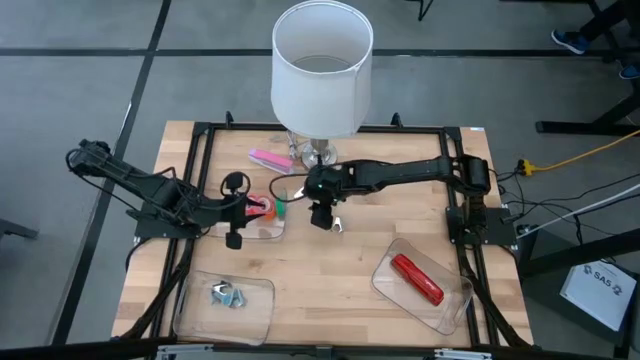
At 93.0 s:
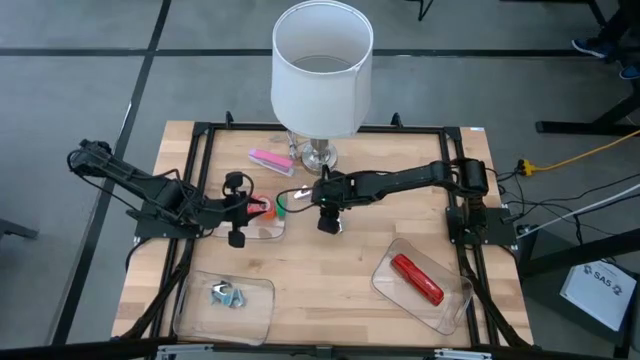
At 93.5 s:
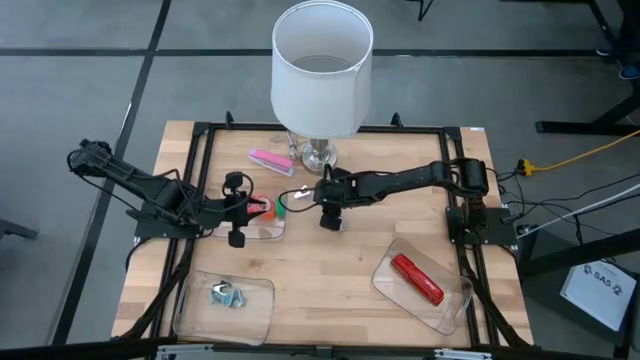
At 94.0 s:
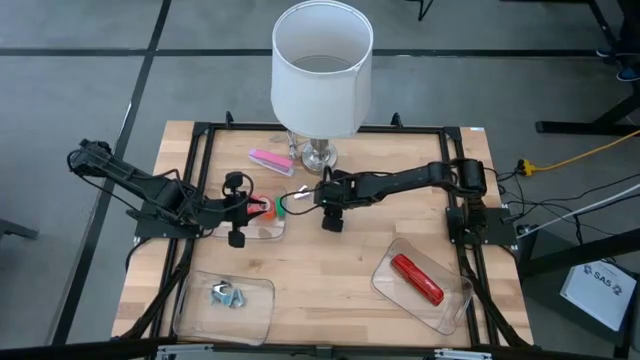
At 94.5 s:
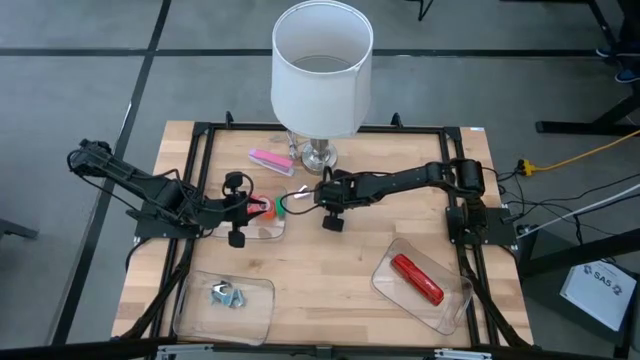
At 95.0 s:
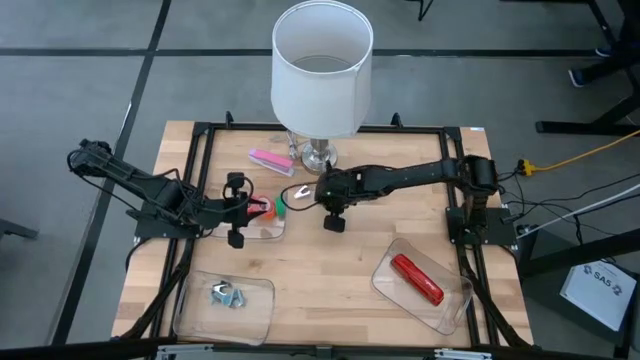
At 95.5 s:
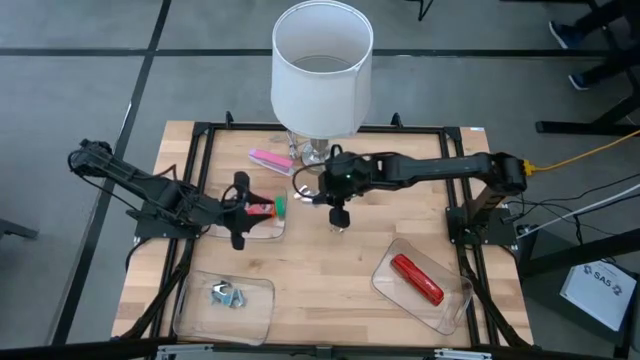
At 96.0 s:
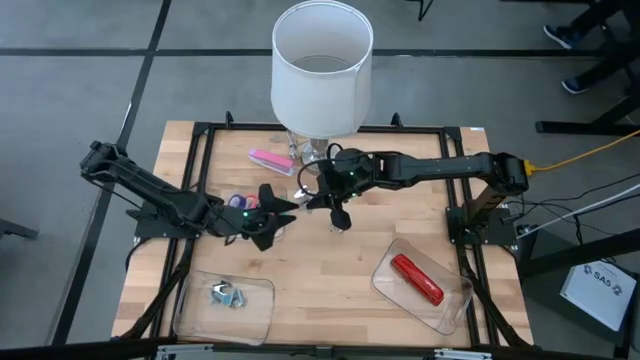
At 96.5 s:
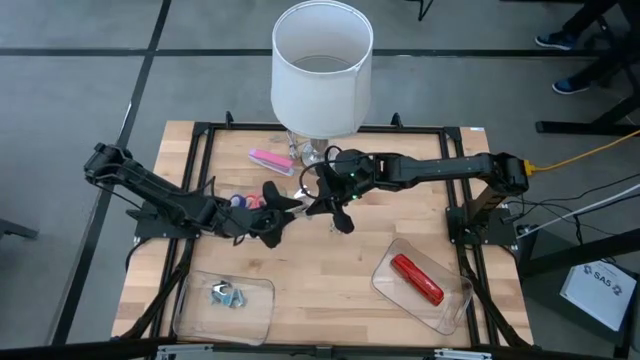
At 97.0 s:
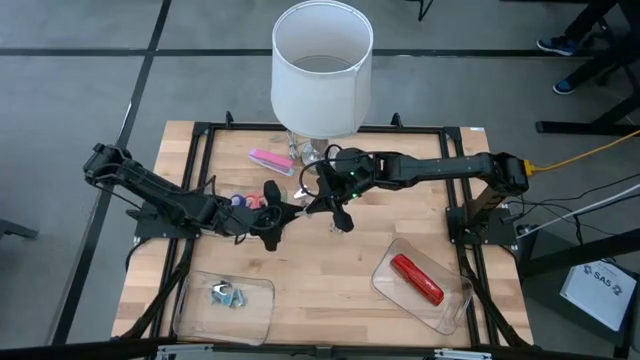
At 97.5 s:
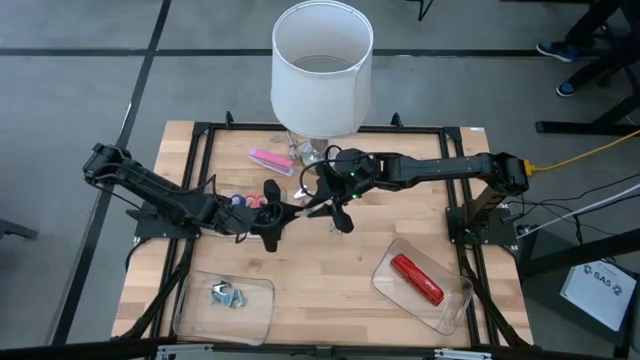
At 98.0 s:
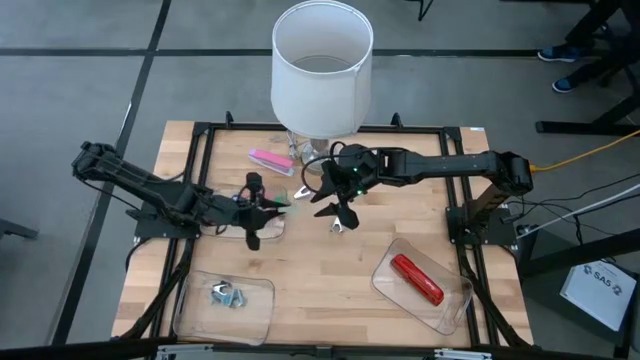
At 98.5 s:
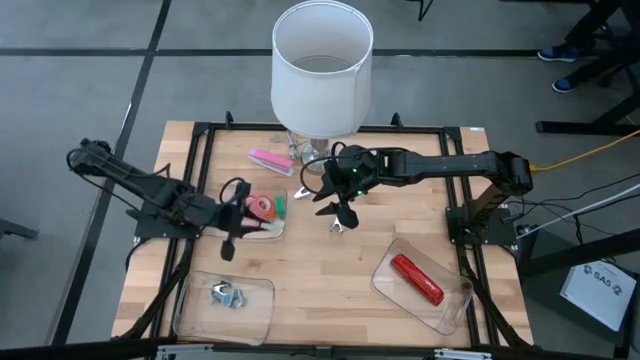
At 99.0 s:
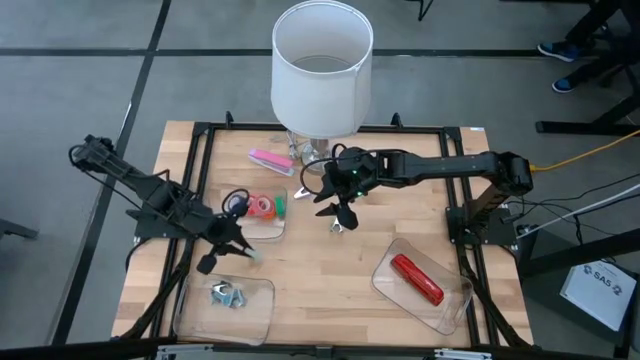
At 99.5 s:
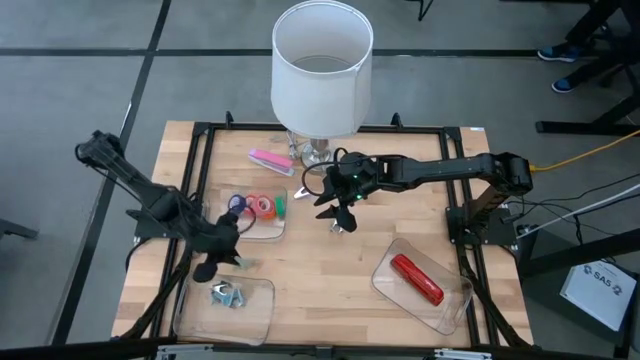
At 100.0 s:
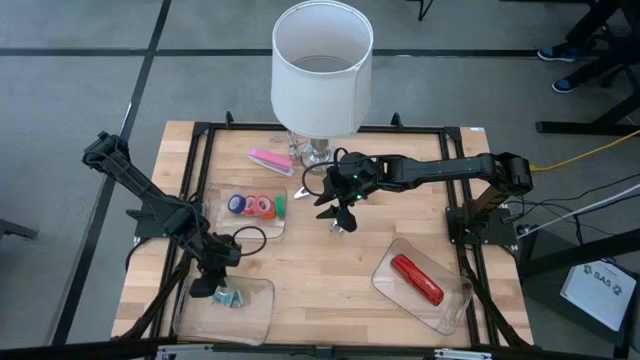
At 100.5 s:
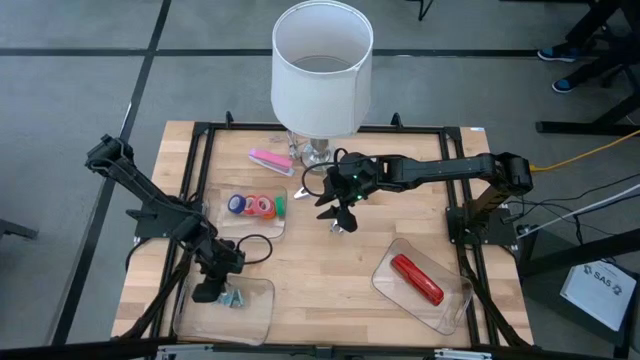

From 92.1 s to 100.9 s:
Task: Pick and place Stapler, Stapler remover, tape
Put the top gray staple remover into the bottom left transparent bin

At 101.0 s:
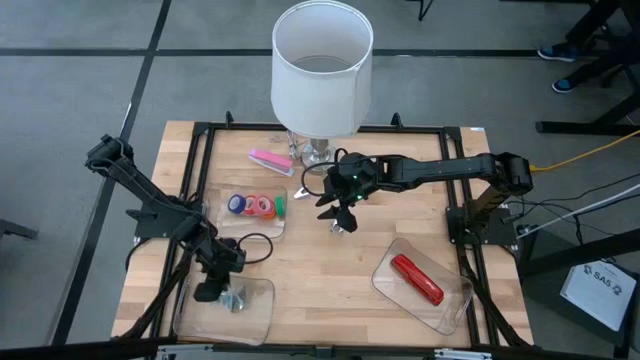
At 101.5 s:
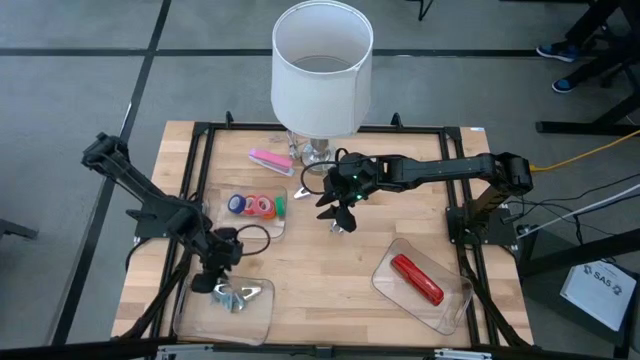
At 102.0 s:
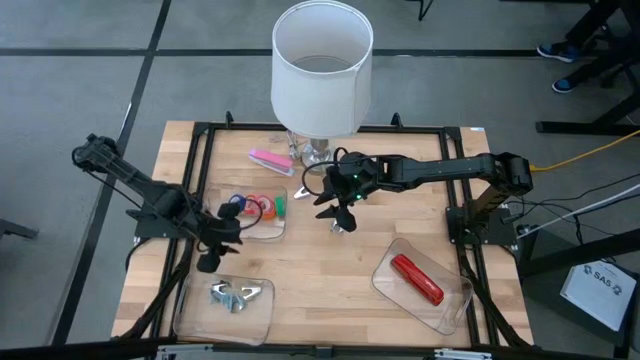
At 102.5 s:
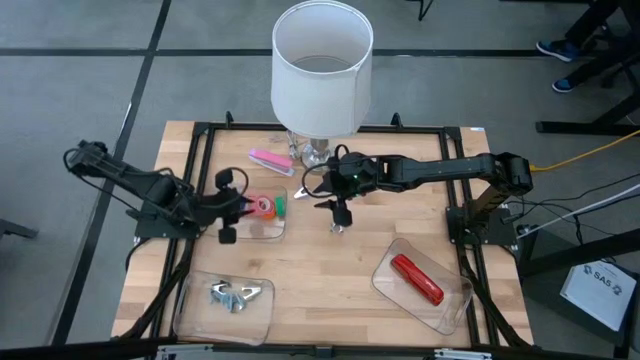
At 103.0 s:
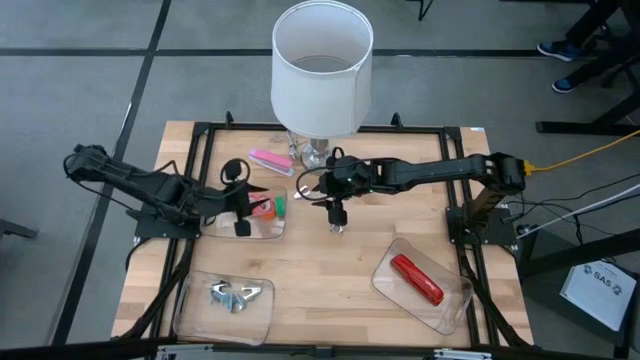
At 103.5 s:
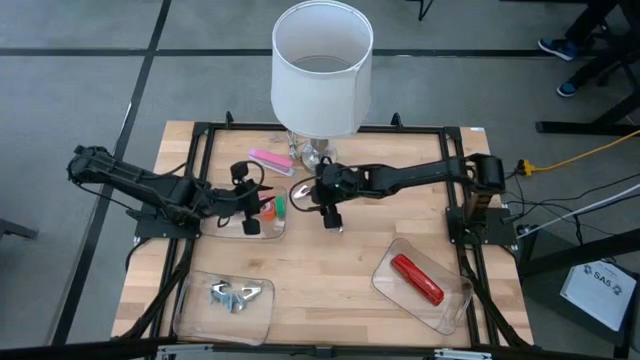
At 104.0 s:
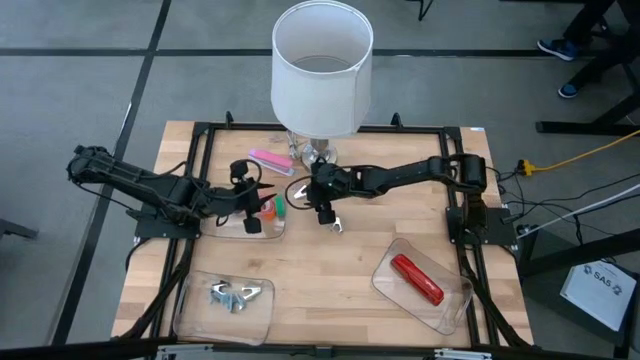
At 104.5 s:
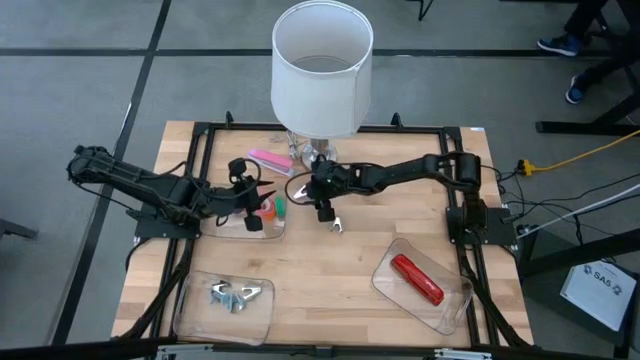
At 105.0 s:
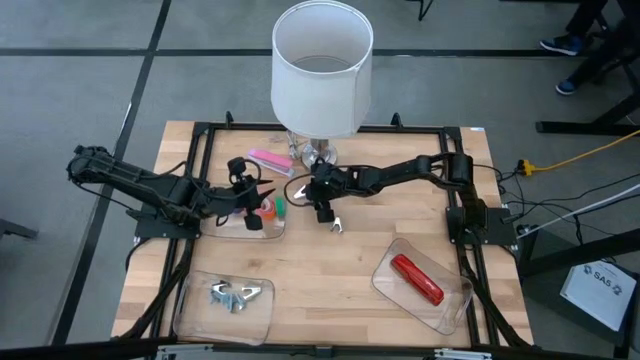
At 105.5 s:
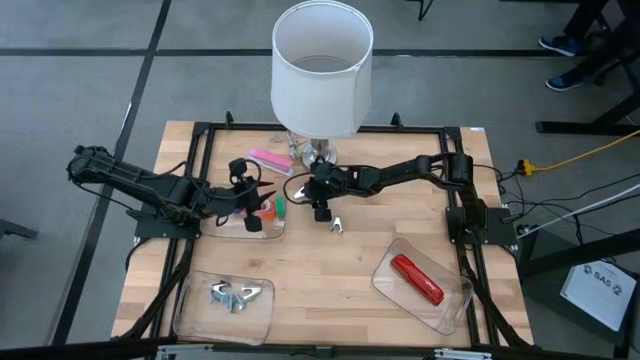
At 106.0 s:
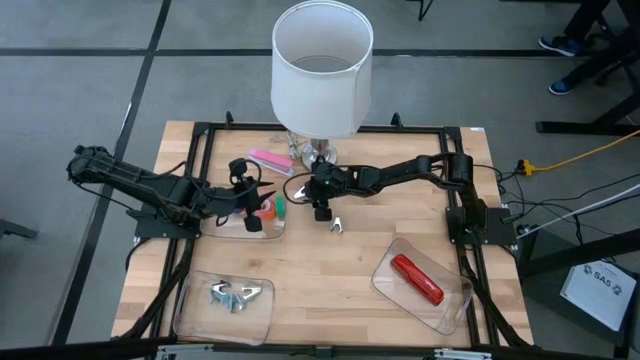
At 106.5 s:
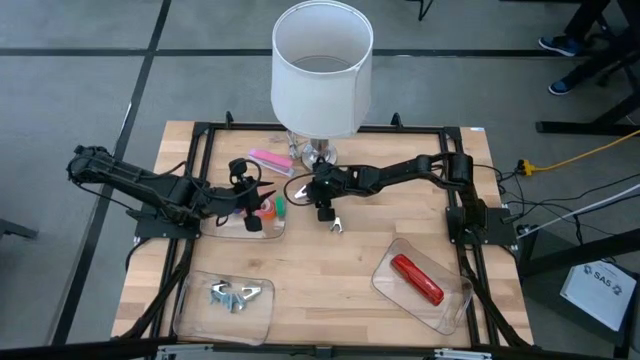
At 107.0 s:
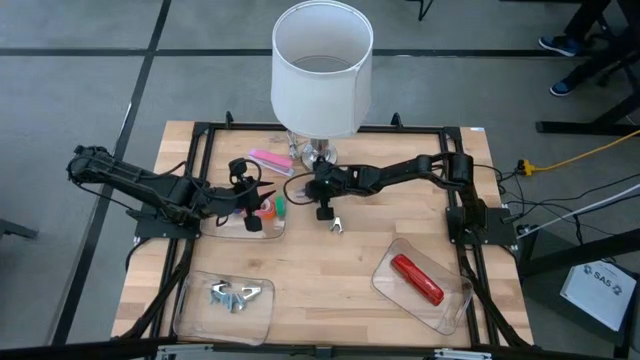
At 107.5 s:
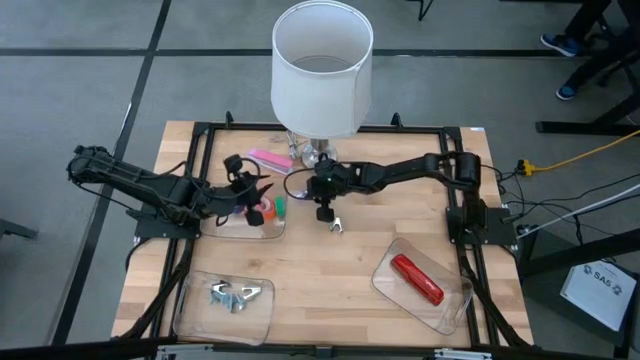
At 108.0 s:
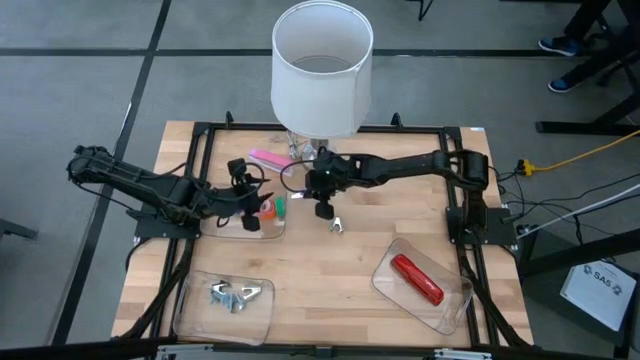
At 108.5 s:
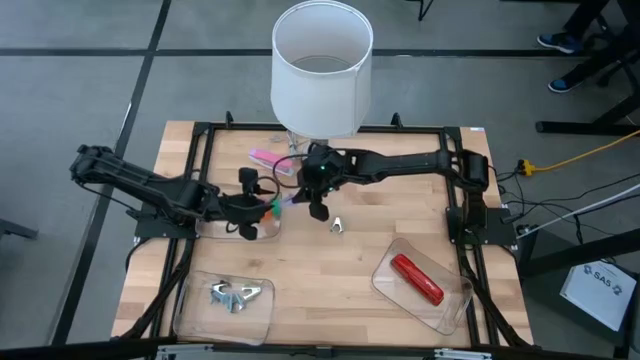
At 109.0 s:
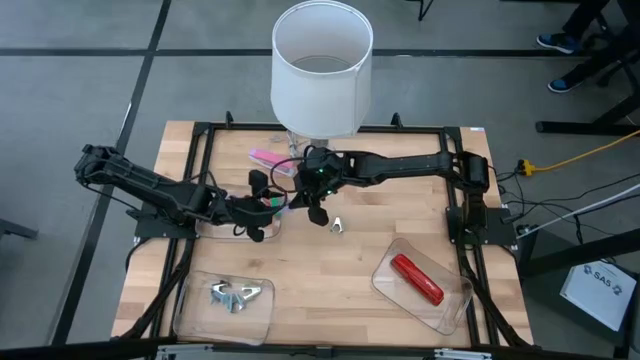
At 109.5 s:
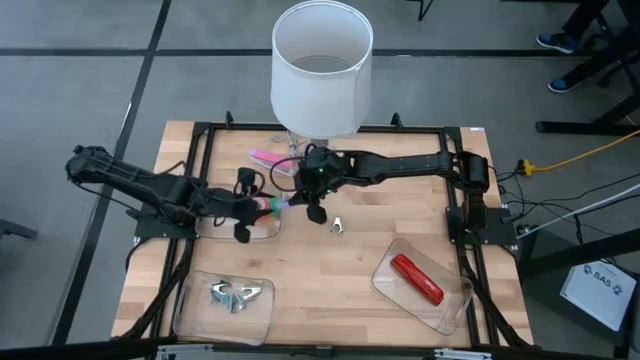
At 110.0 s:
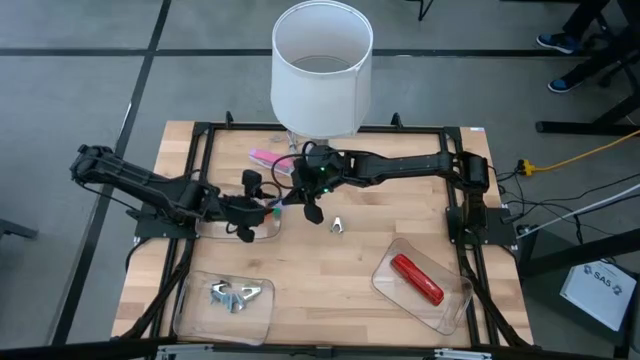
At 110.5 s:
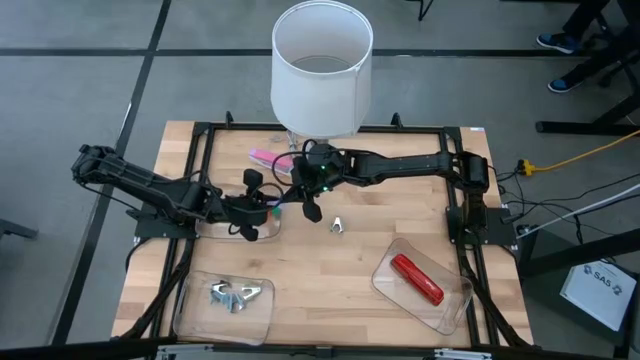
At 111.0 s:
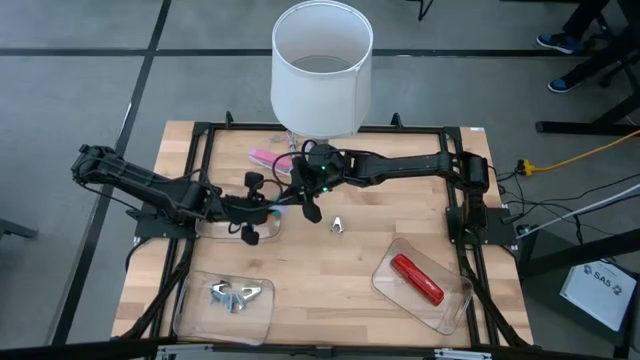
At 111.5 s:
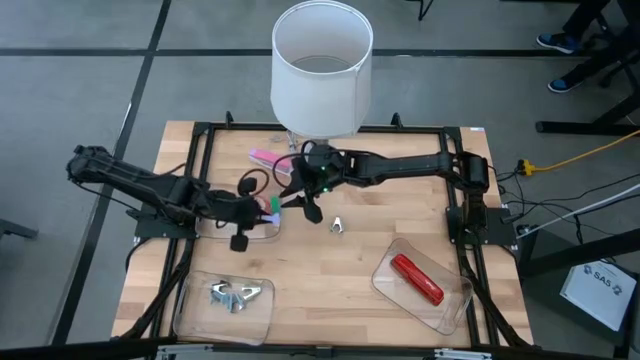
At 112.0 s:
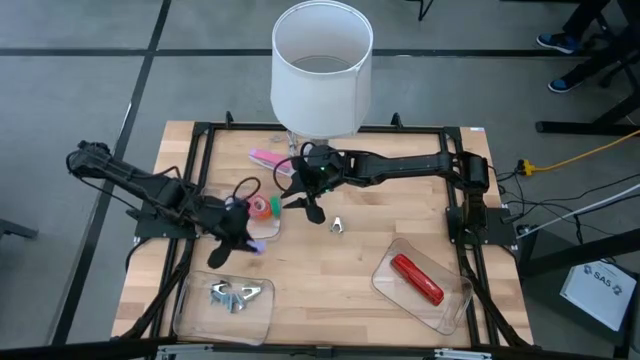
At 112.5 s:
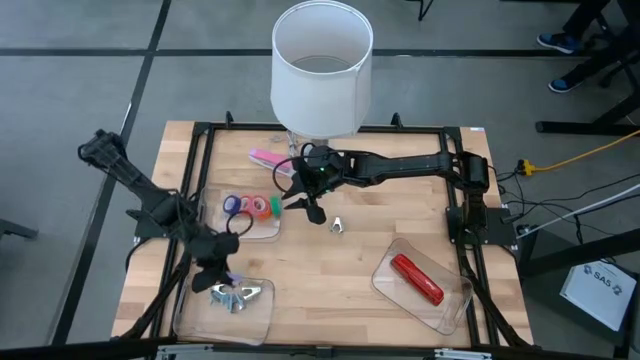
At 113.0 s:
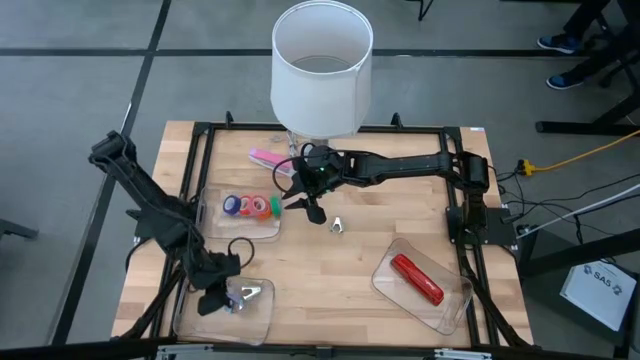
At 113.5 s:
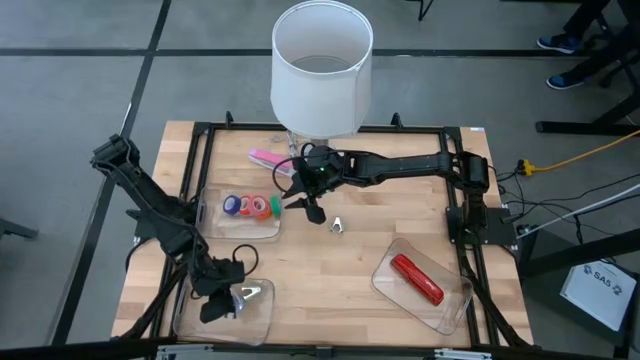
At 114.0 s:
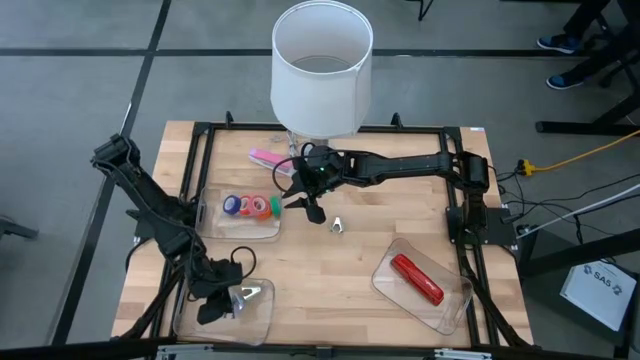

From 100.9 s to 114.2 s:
Put the purple staple remover into the bottom left transparent bin
